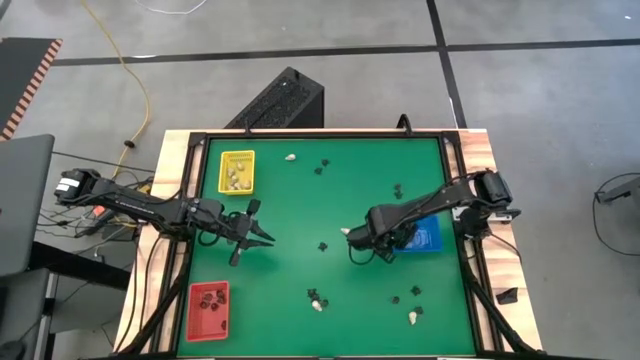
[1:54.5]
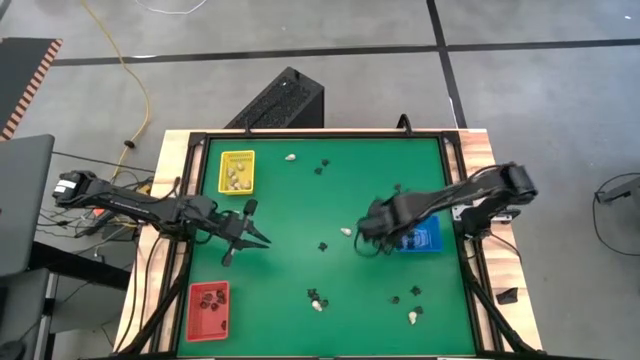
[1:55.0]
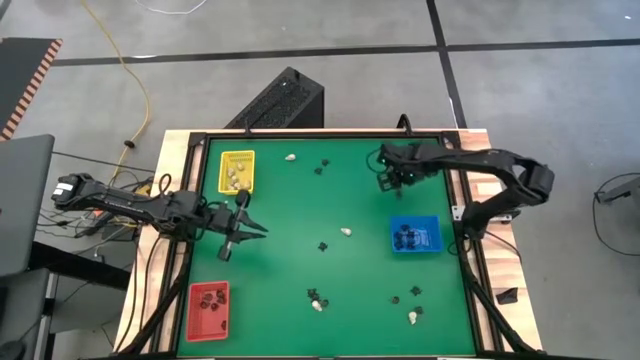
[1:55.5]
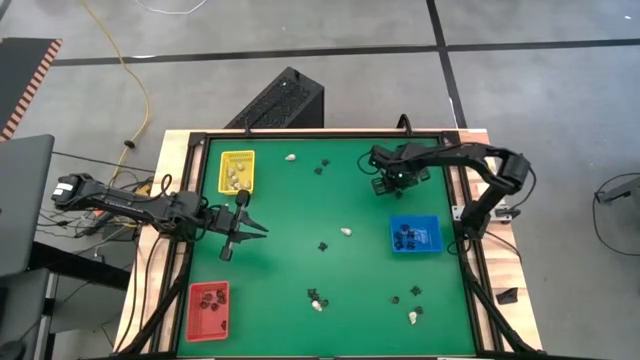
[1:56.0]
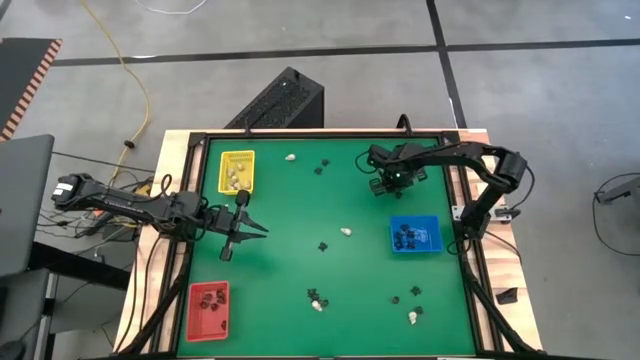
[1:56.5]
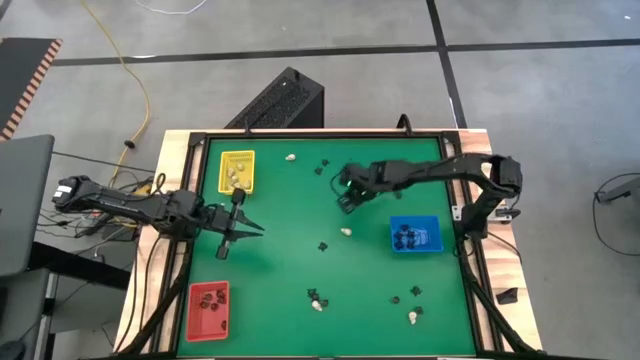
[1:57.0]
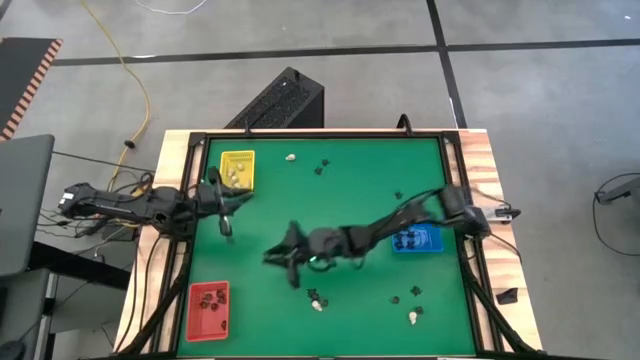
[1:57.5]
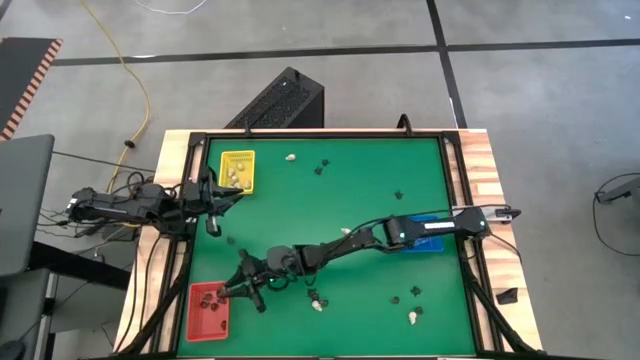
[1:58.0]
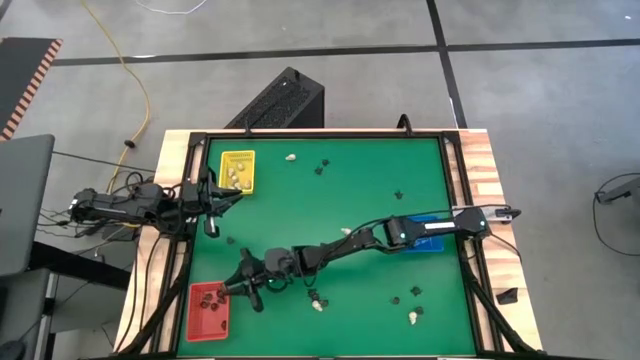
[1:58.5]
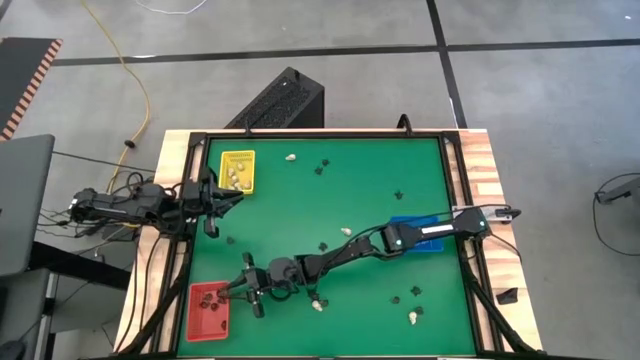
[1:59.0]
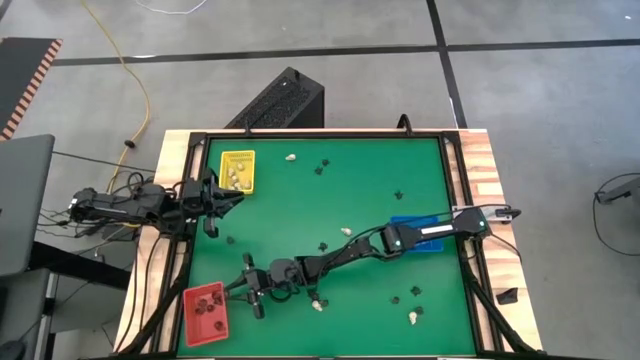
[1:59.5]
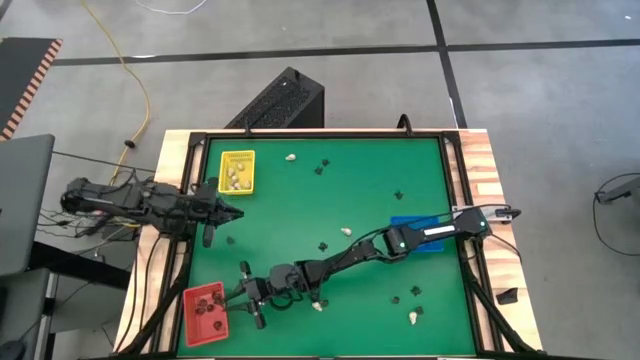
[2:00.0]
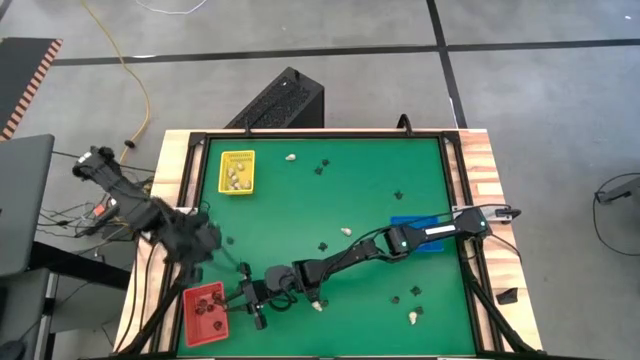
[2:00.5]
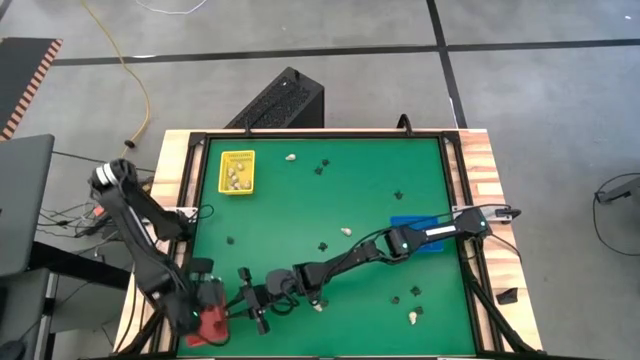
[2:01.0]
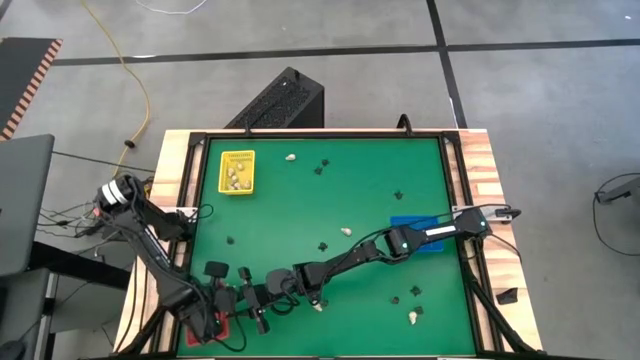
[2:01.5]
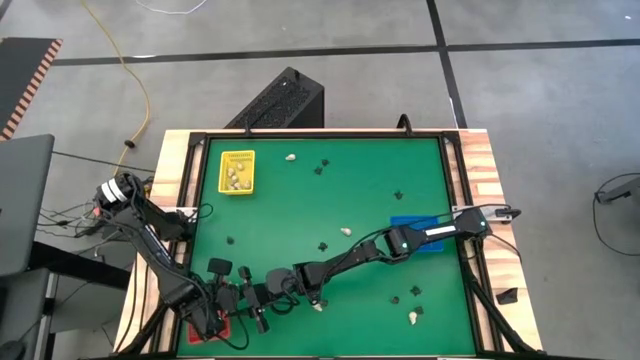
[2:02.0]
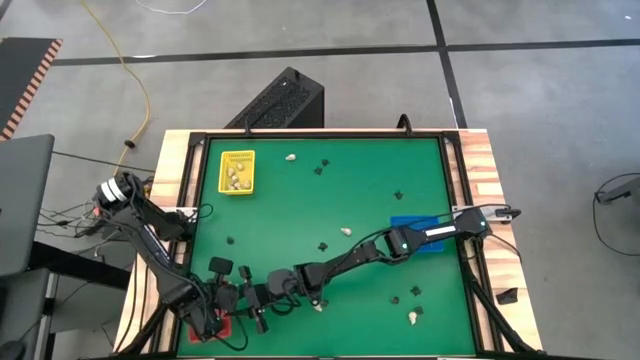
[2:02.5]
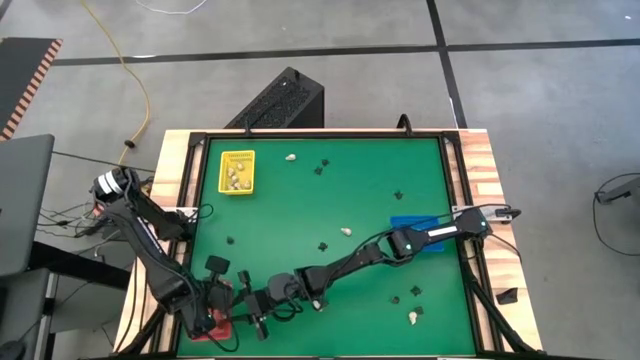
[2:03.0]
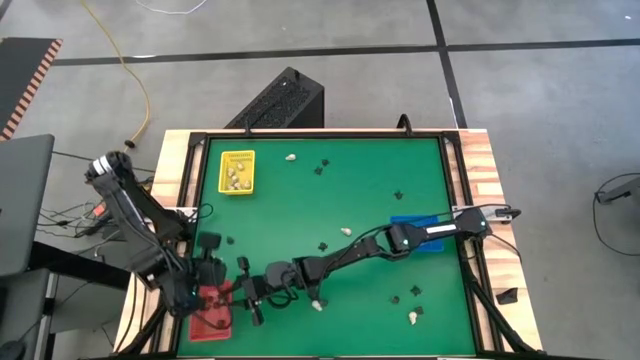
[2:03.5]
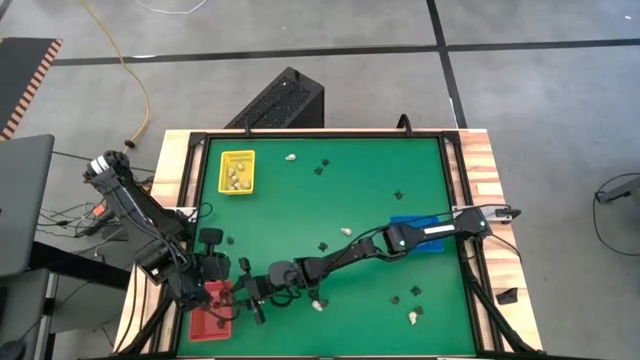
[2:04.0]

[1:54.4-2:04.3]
Task: Sort Halloween decoration
Put the black skull toy into the red bin

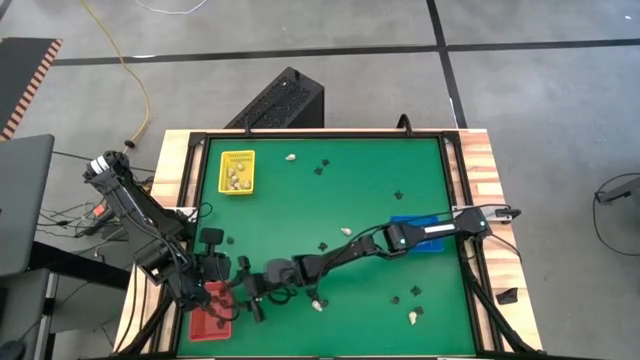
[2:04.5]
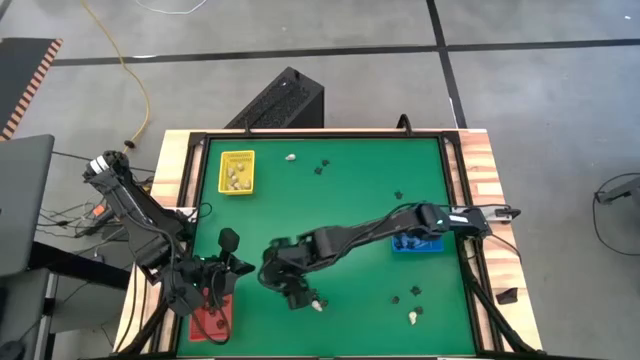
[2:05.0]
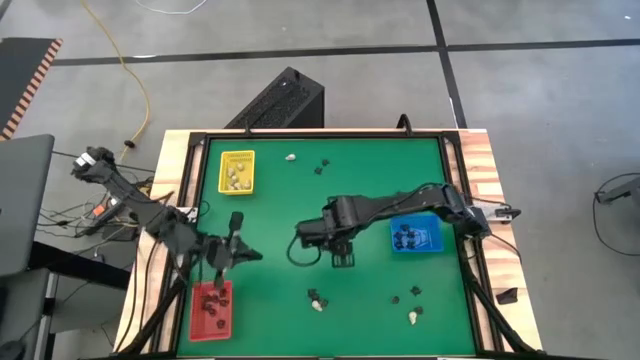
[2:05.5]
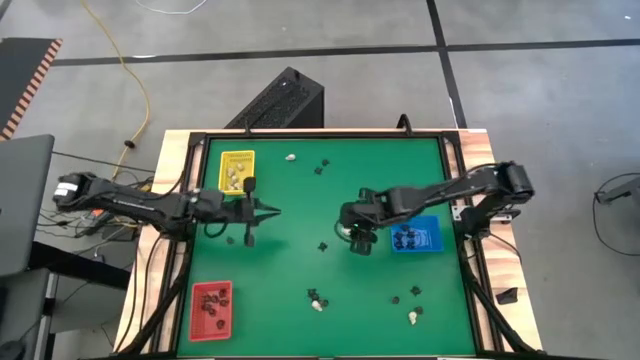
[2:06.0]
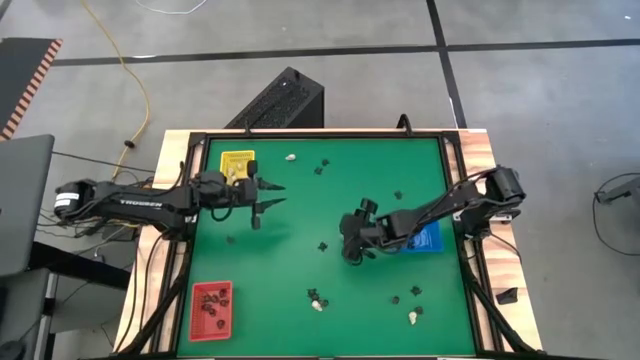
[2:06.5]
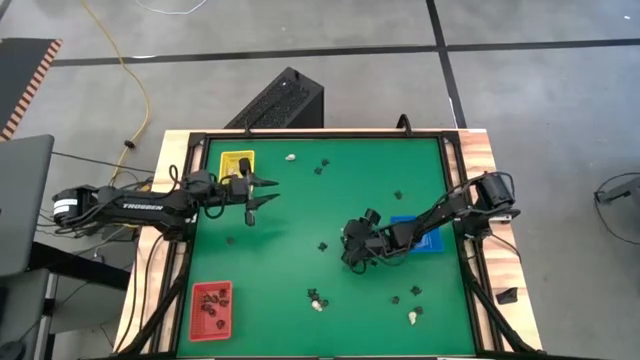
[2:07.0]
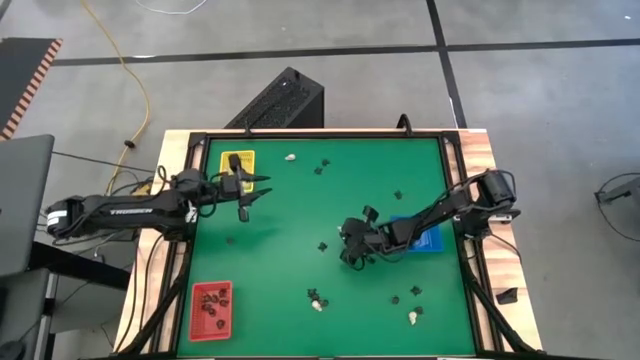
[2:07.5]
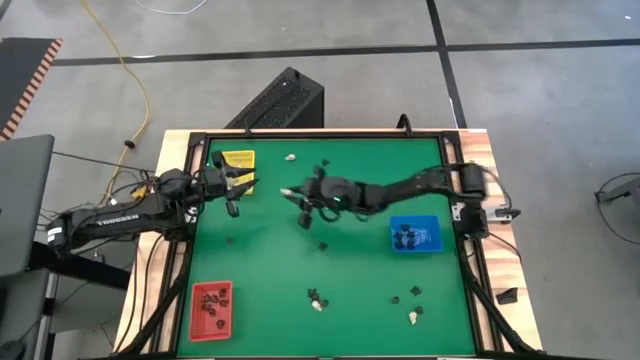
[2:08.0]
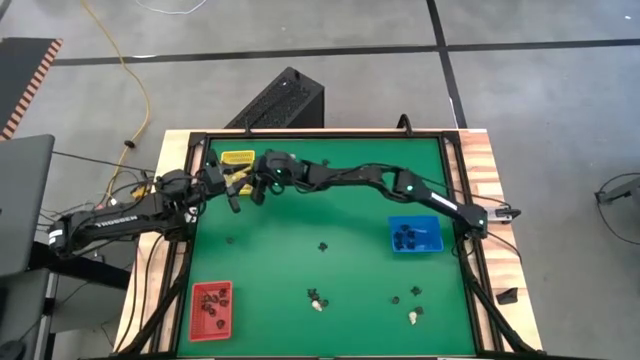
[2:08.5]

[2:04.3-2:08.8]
Put the white skull toy into the yellow bin

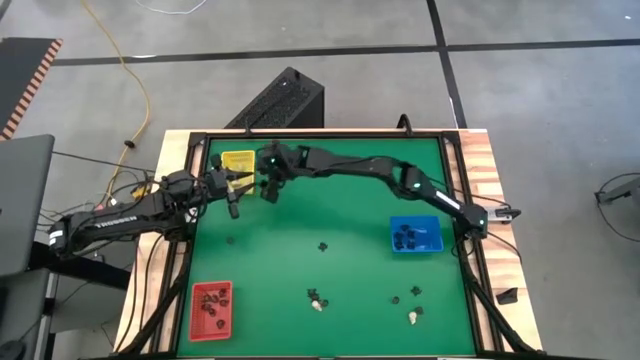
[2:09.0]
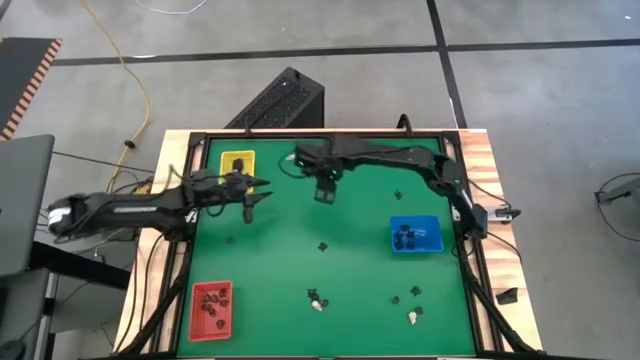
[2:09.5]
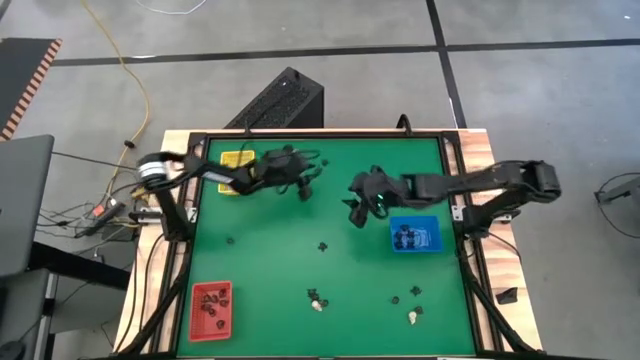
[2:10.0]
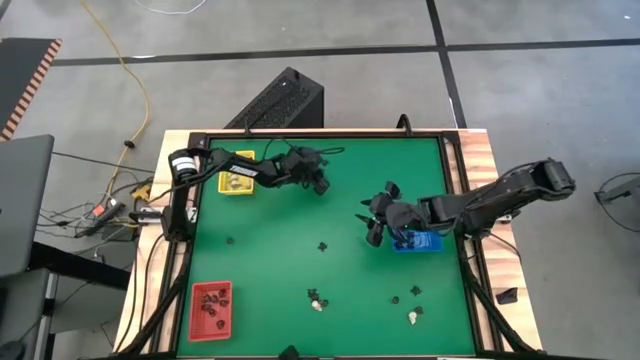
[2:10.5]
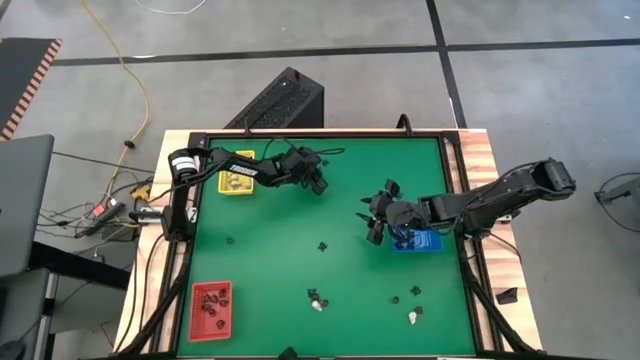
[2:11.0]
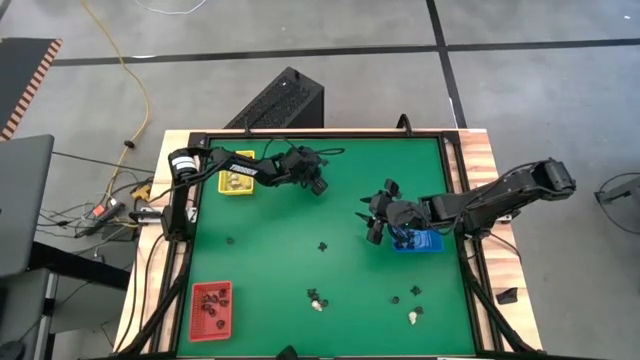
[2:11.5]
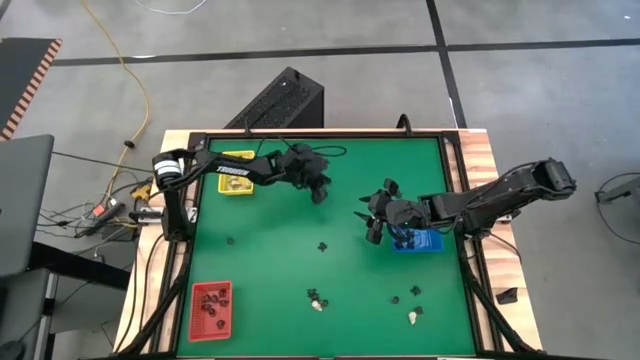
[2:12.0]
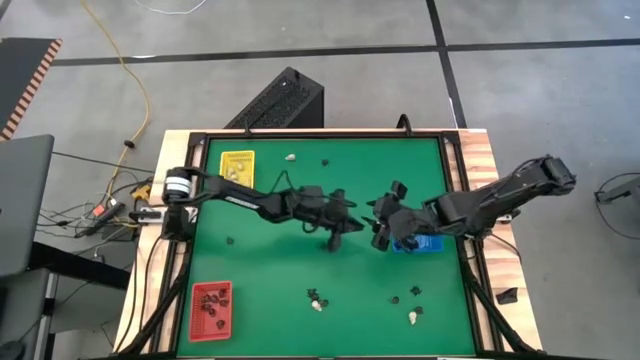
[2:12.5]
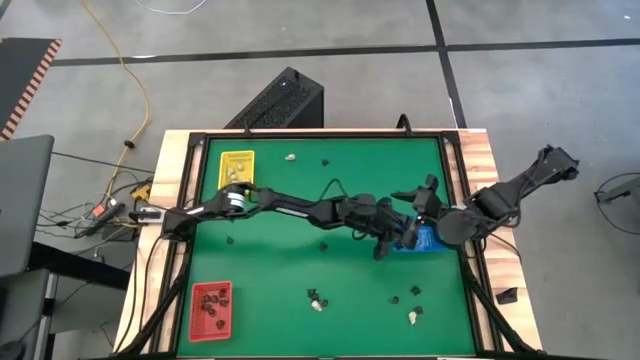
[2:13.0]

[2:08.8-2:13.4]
Put the black spider toy into the blue bin

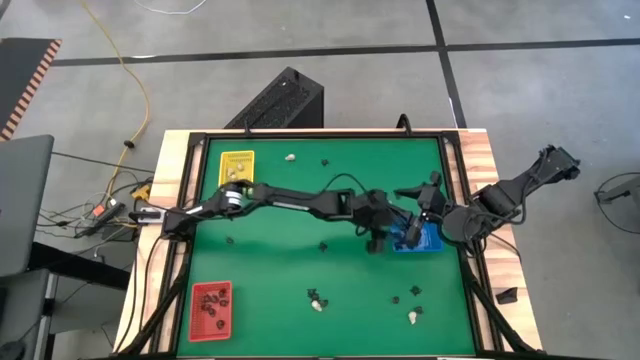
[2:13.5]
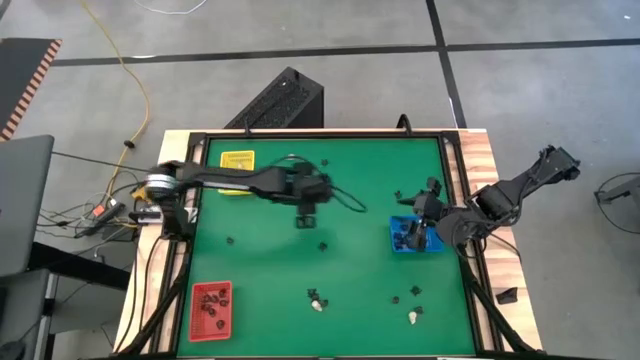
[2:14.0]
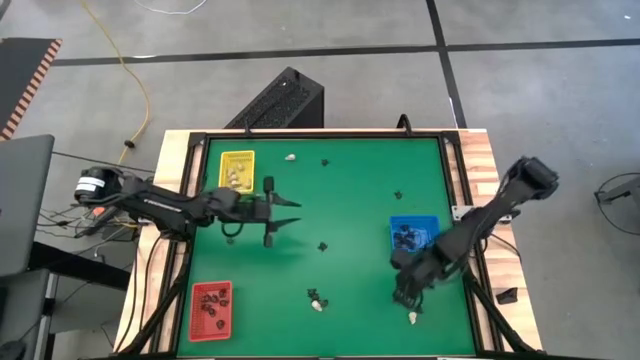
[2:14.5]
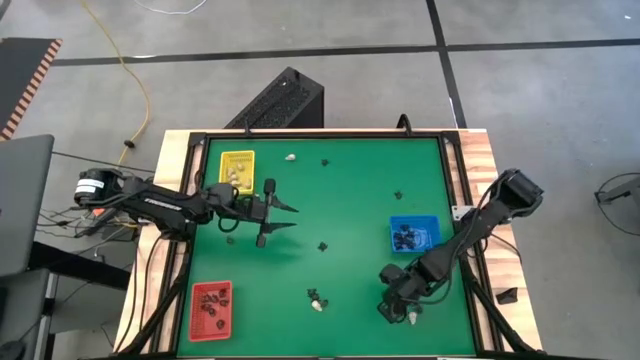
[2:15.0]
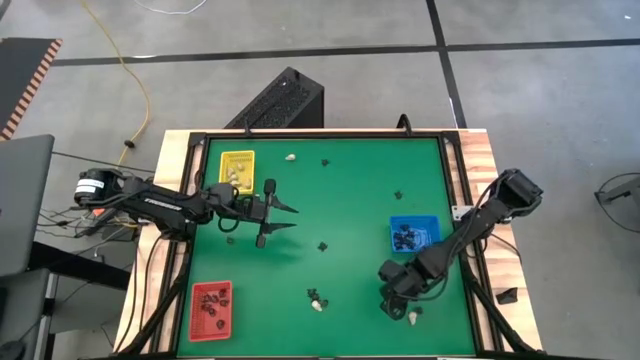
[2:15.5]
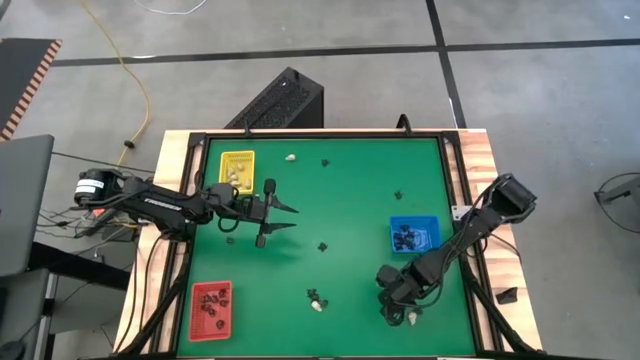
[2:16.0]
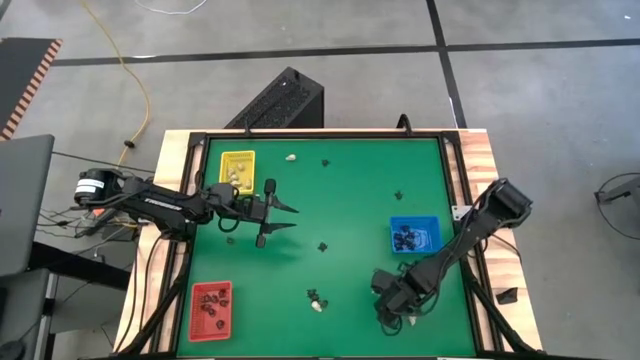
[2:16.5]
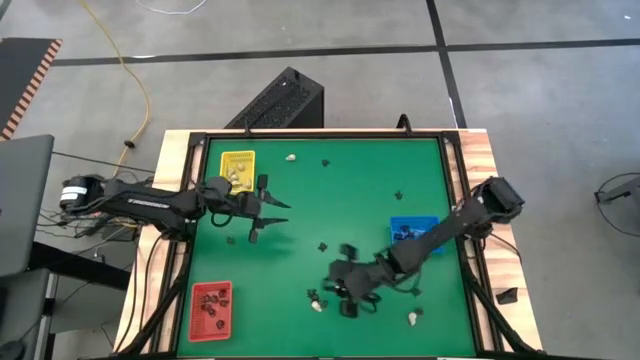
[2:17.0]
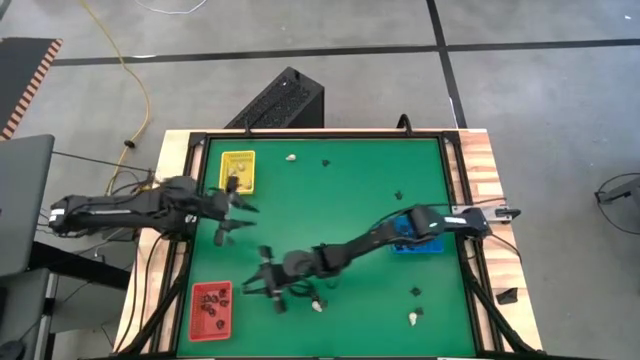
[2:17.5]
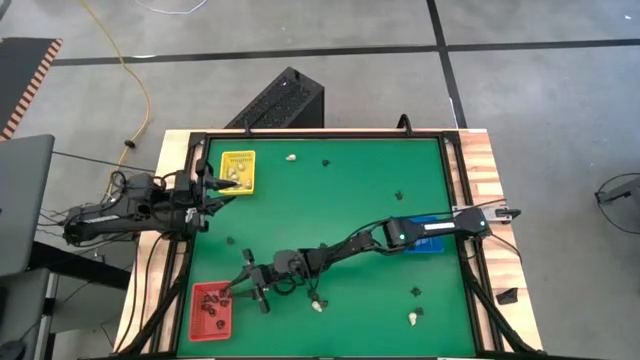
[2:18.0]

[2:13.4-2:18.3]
Put the black skull toy into the red bin
